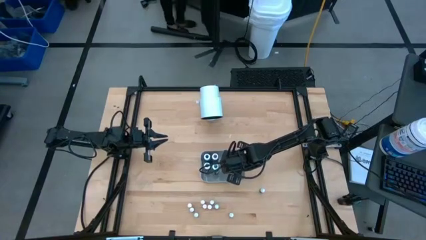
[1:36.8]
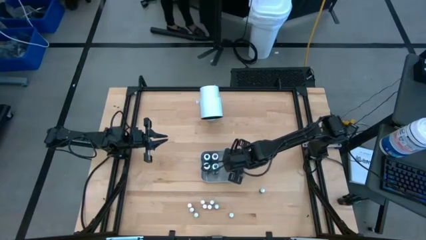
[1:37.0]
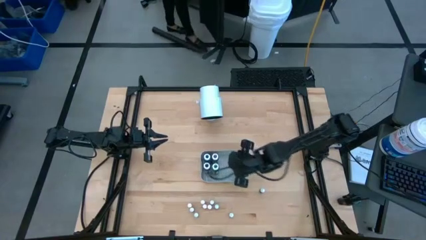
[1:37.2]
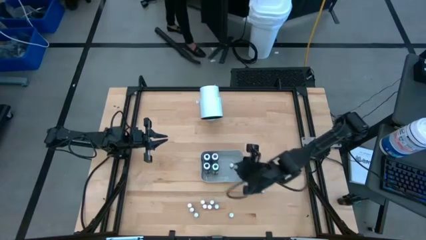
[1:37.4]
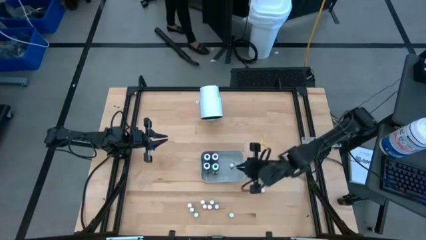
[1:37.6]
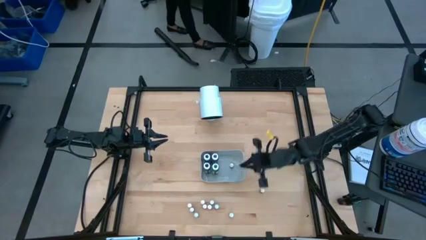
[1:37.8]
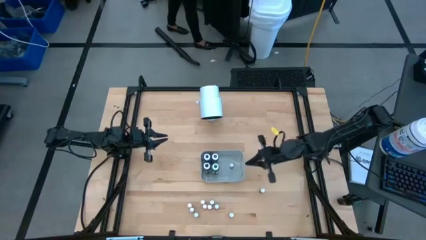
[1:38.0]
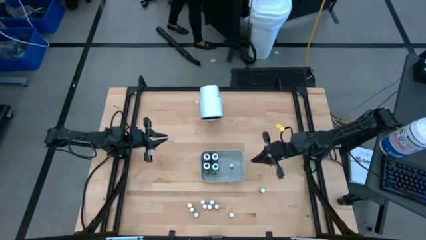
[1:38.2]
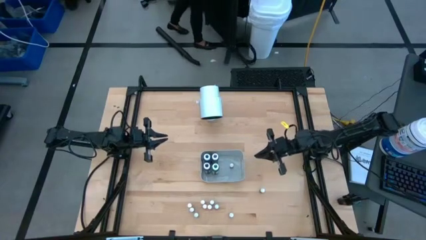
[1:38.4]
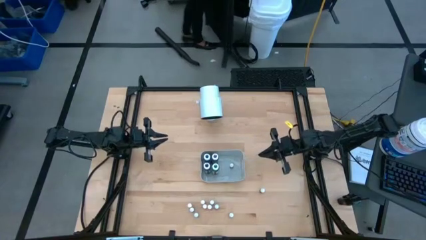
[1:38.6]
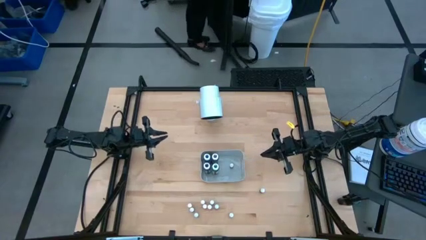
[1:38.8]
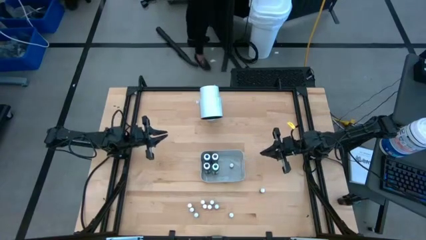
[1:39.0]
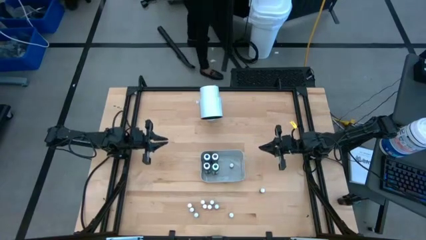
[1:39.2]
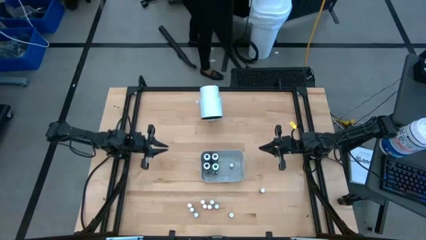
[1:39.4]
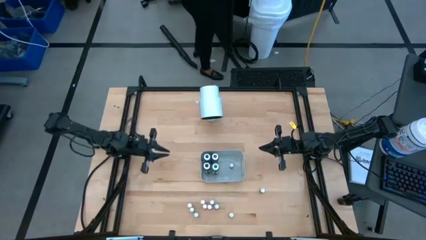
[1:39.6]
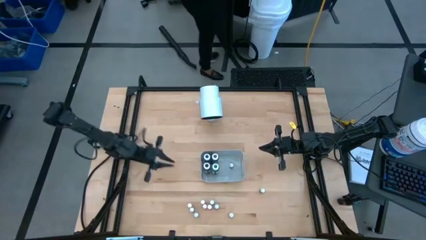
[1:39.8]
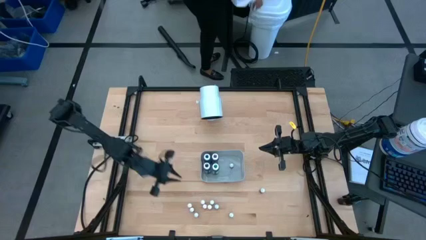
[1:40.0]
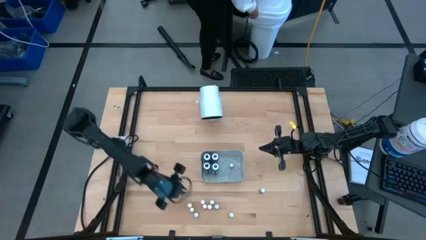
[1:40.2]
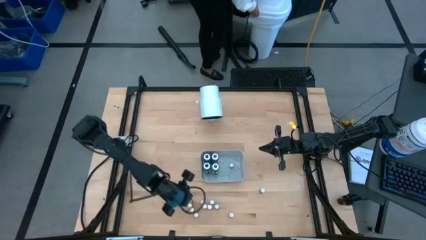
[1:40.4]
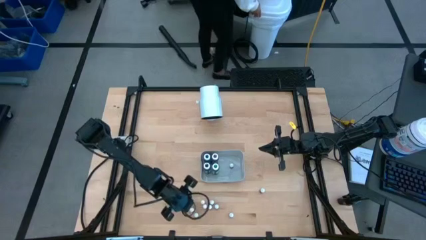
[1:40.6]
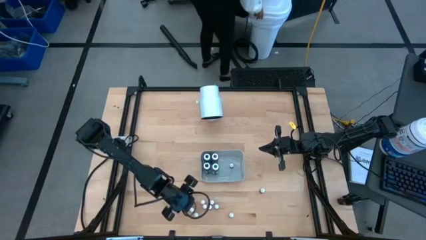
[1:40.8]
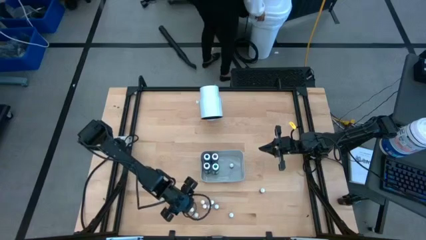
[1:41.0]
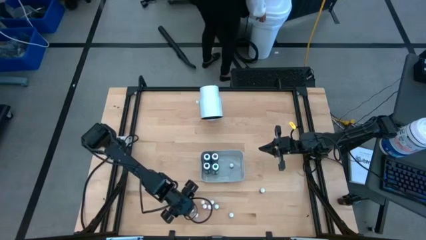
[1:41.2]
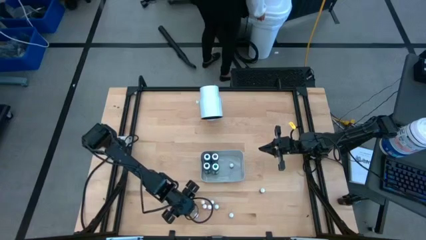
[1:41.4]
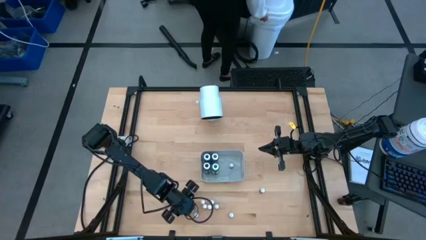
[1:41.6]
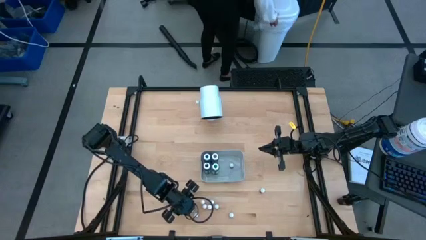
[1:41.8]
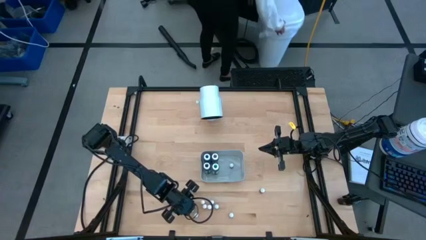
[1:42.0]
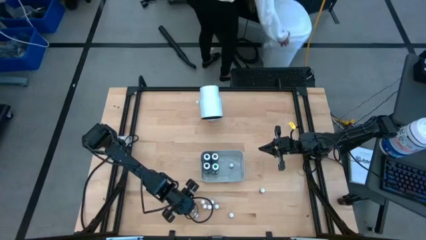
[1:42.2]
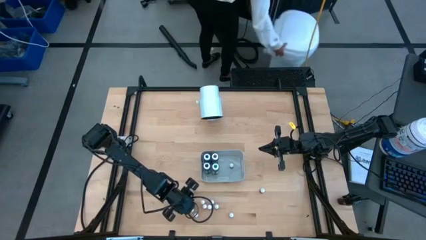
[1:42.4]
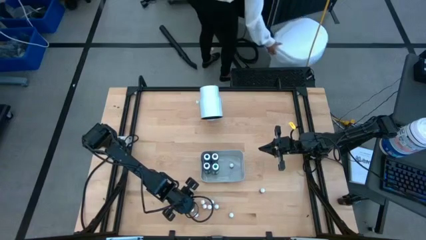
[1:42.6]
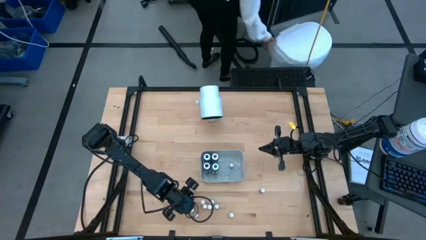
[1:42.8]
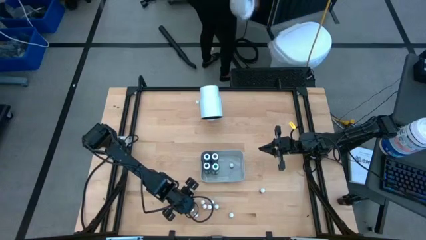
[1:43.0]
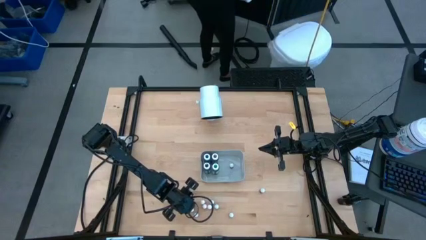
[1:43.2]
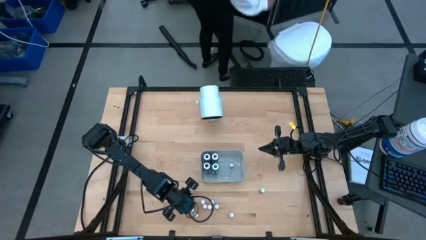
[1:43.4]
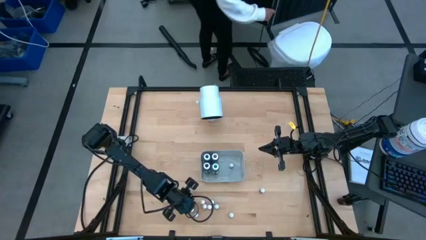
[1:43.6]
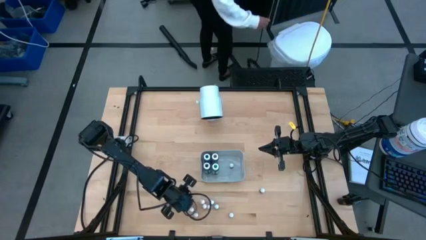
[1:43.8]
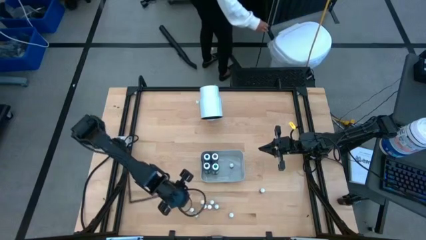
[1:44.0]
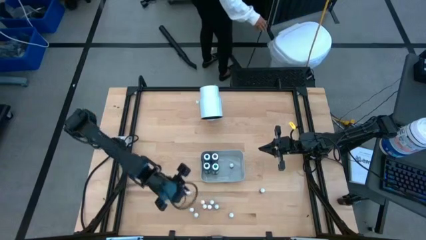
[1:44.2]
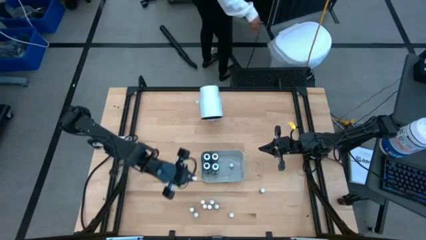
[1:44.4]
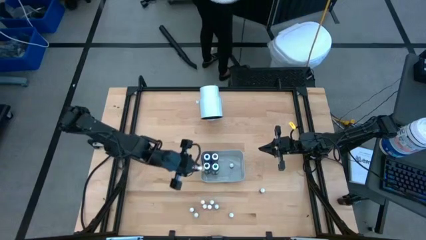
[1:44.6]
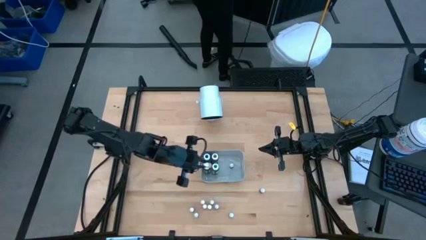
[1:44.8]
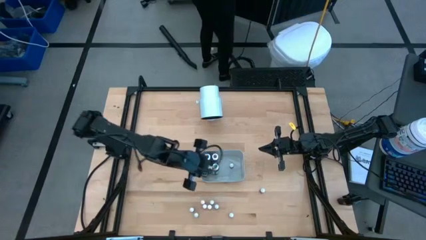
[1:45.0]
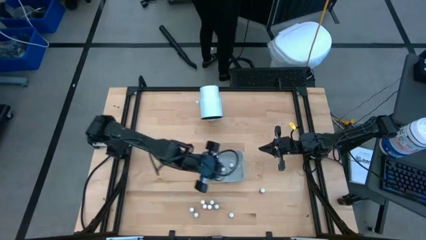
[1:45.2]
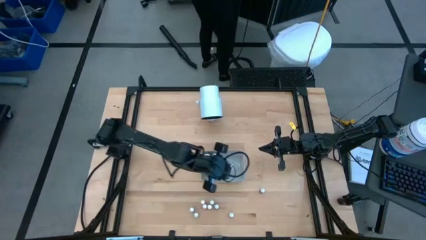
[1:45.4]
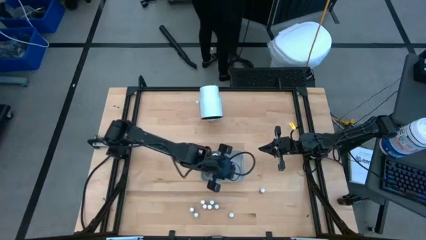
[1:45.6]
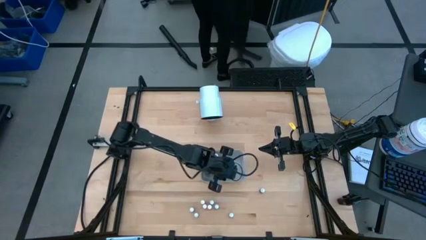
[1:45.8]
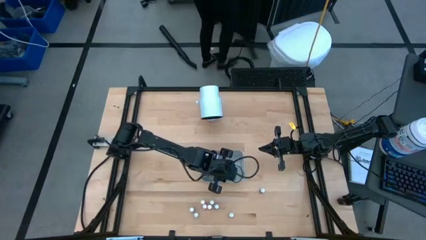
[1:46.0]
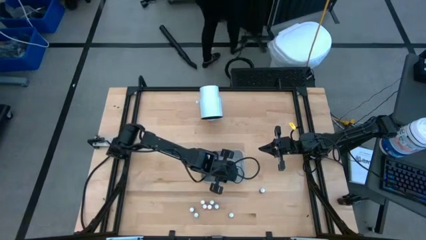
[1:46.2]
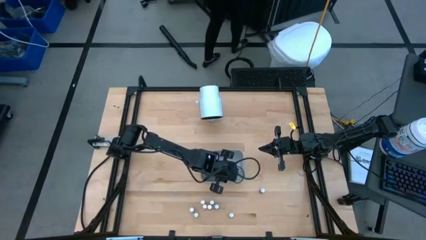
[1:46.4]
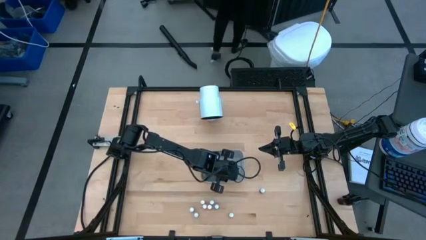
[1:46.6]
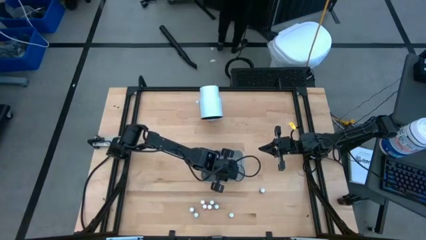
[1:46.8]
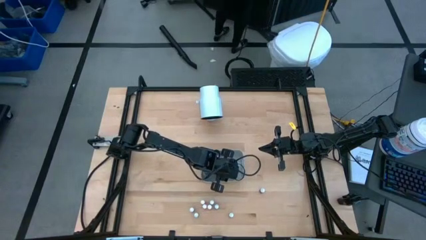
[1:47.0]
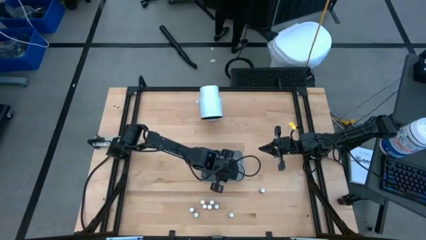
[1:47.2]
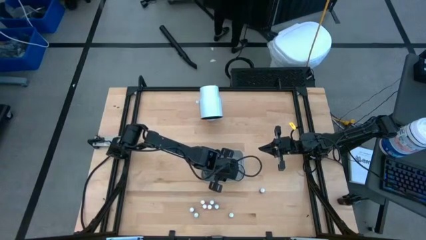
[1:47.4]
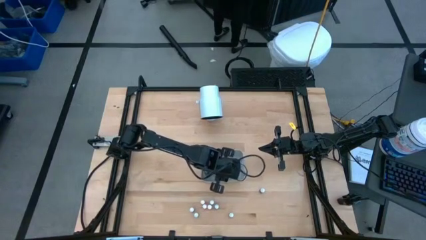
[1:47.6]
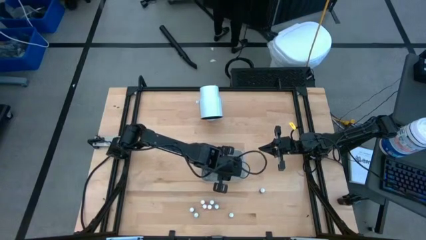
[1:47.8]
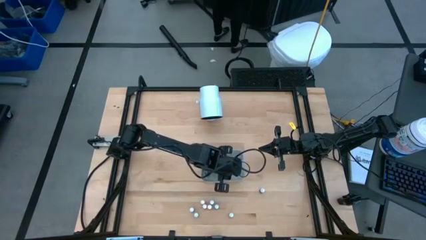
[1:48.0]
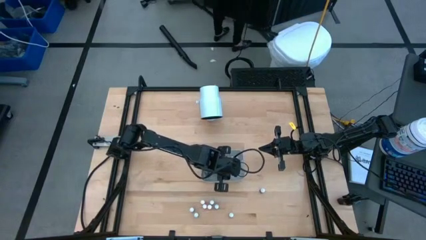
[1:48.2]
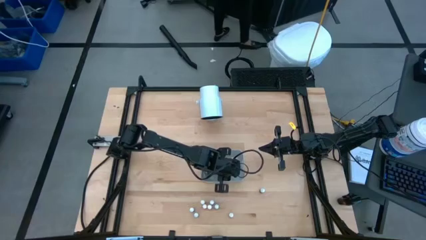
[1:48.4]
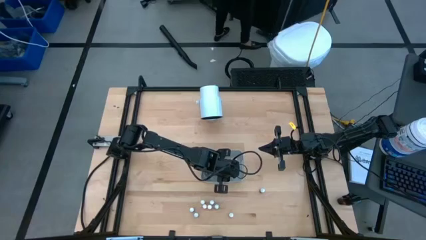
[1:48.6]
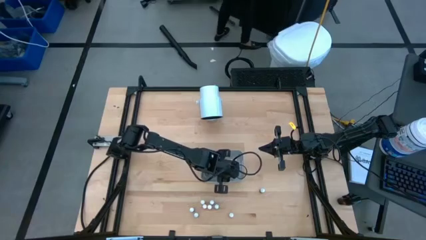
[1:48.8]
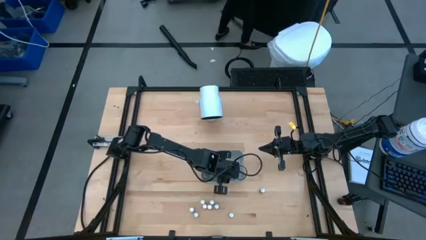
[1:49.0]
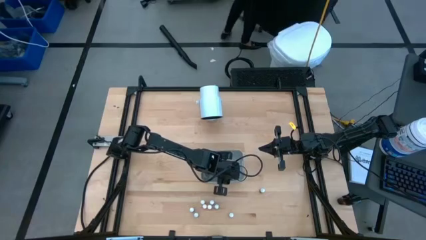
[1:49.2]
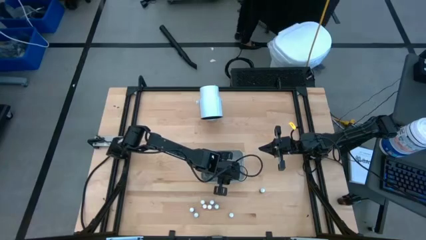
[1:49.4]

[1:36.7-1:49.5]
Task: Pick & Place food coloring
Put the orange food coloring bottle into the gray bin

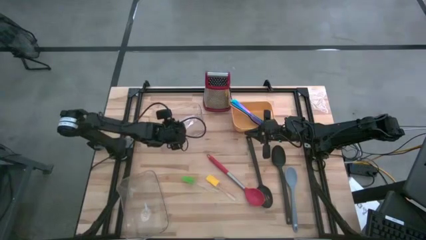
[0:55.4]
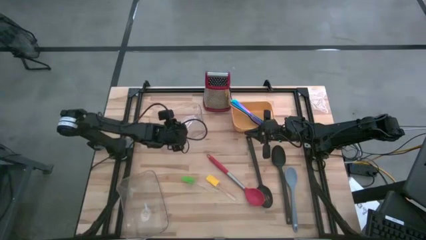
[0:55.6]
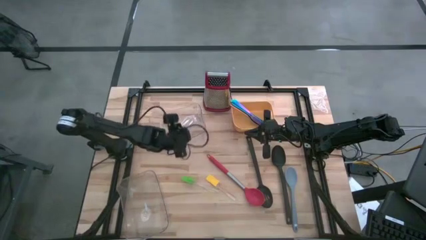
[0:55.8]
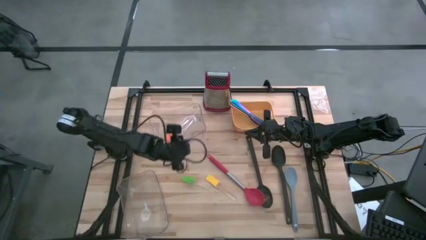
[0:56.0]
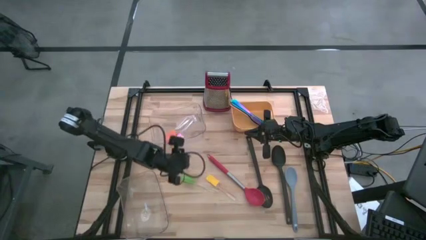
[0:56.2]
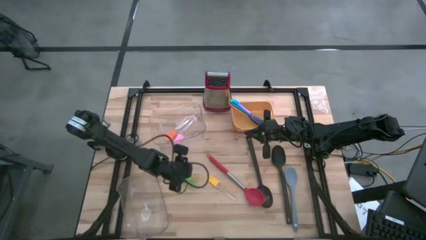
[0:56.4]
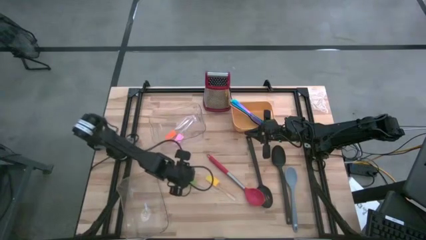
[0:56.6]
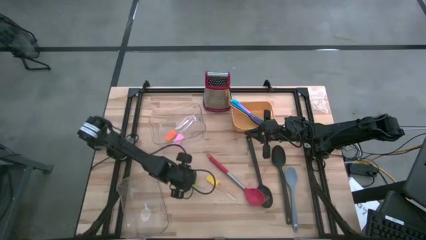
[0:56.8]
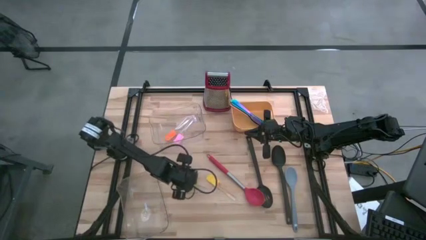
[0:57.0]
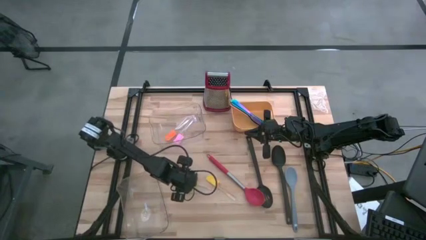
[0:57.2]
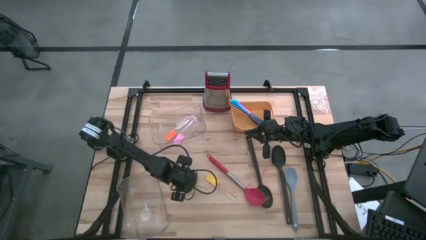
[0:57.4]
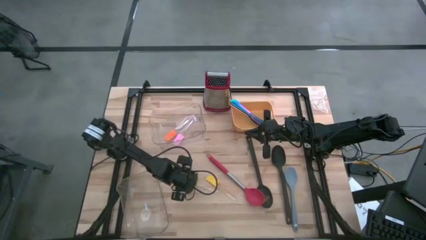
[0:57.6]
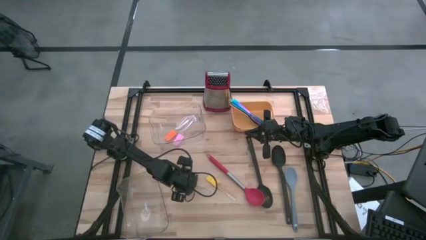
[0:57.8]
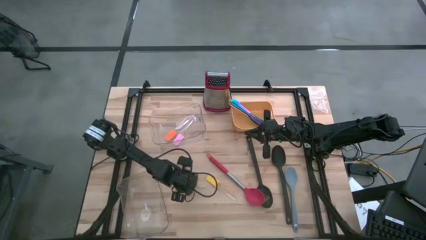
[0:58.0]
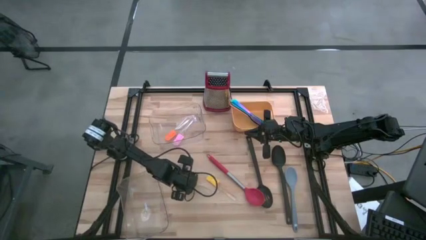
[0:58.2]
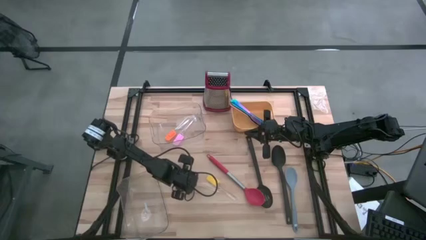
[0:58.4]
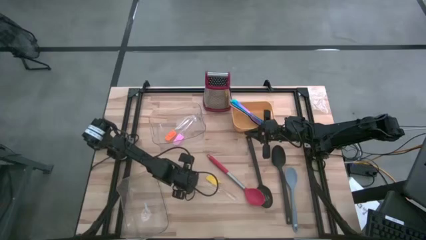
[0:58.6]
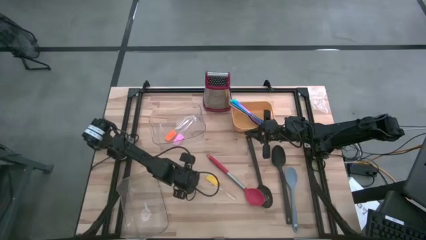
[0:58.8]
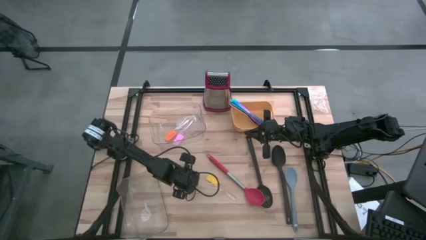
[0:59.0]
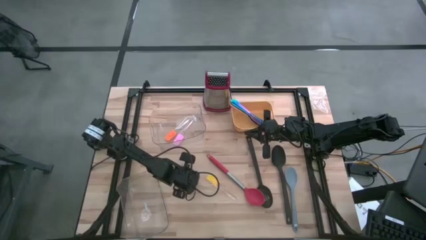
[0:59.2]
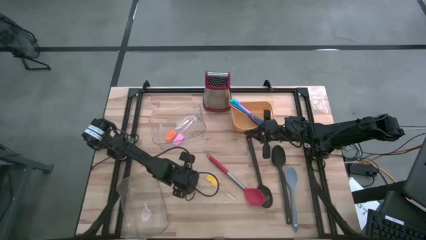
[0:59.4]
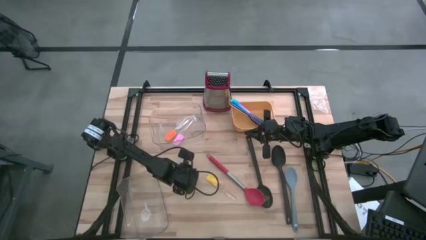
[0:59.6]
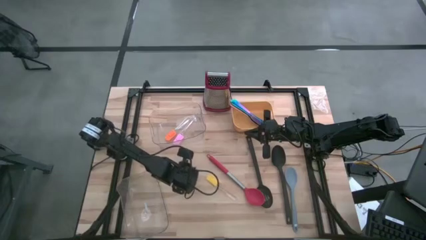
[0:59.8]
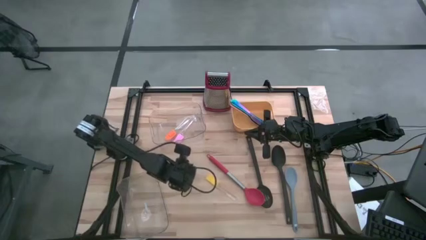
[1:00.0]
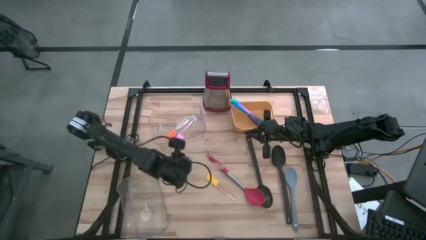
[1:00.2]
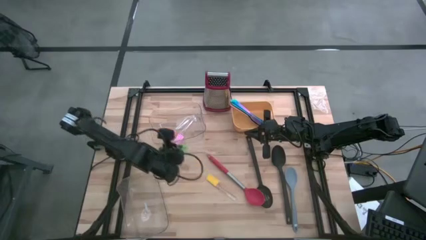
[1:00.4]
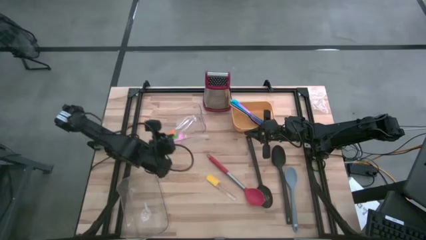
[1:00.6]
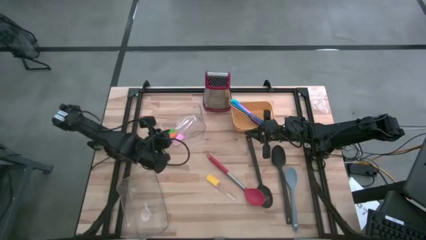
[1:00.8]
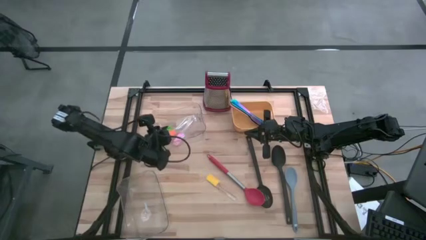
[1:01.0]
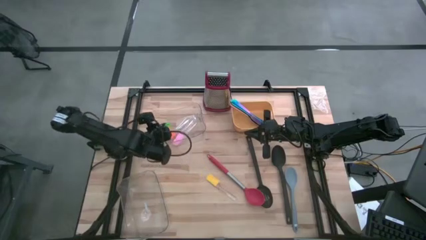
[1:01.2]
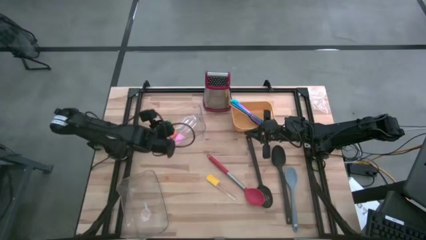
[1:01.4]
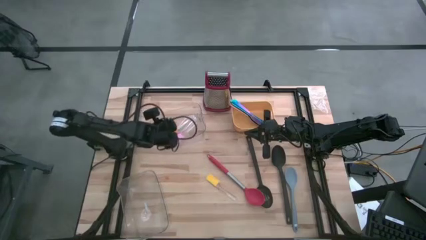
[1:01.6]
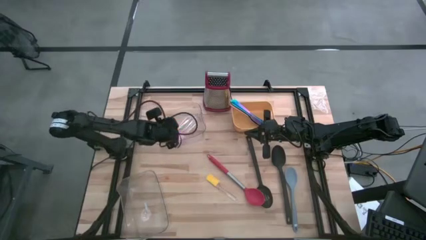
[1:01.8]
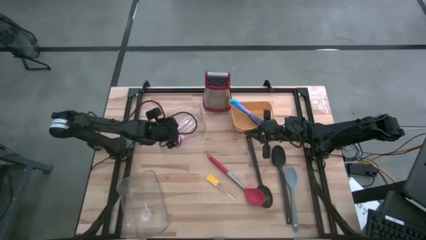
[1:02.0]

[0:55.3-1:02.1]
Task: Pick & Place Kitchen Items
Put the green spatula into the top transparent bin
